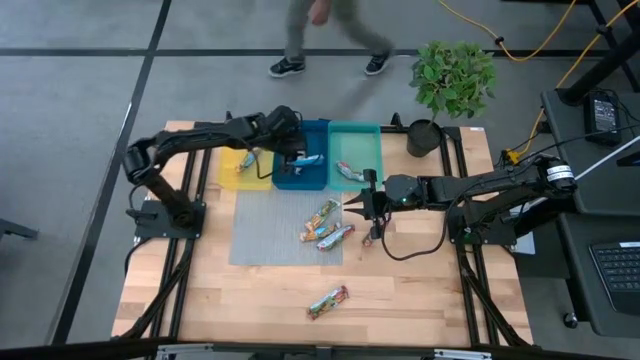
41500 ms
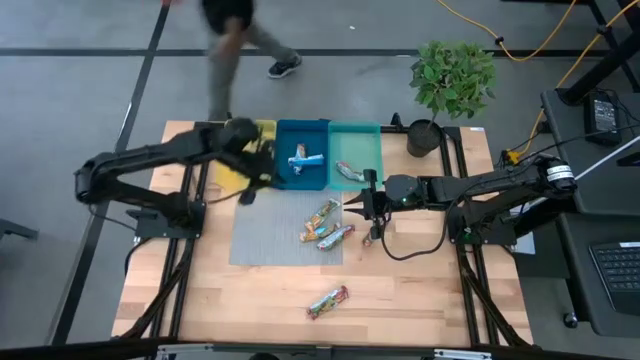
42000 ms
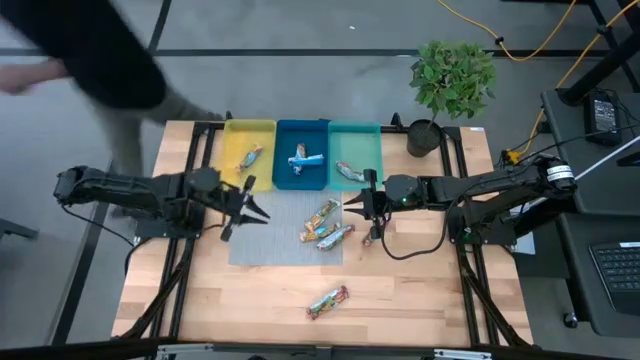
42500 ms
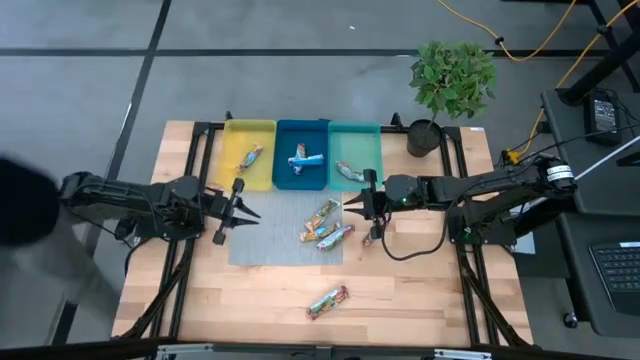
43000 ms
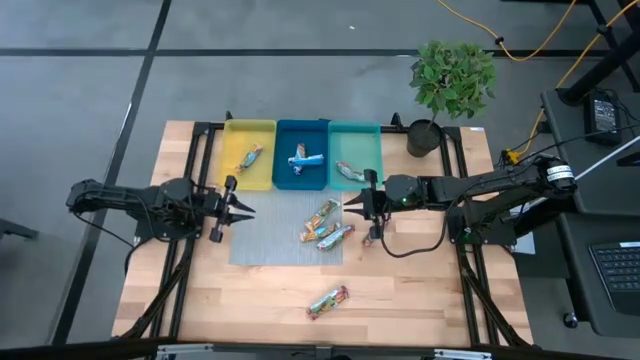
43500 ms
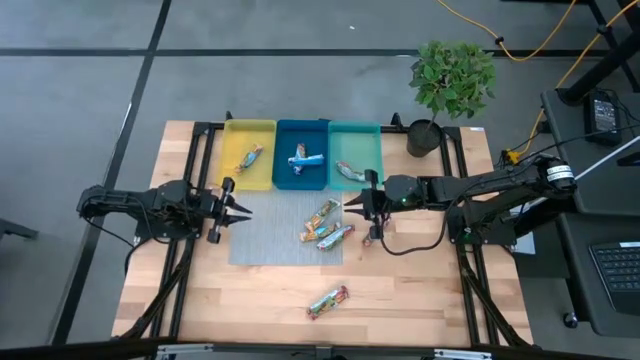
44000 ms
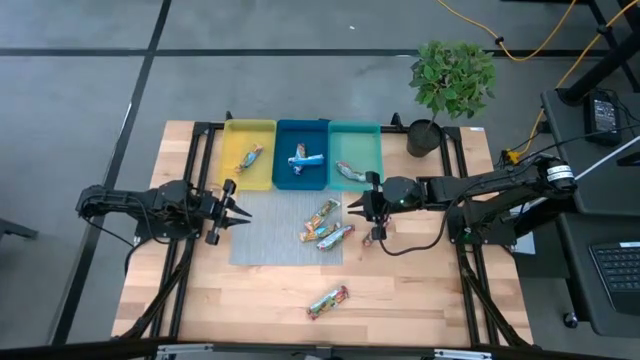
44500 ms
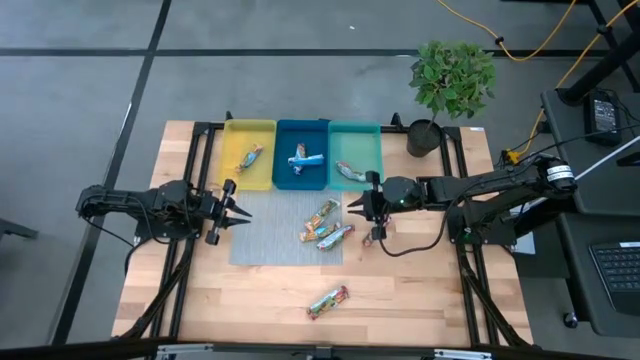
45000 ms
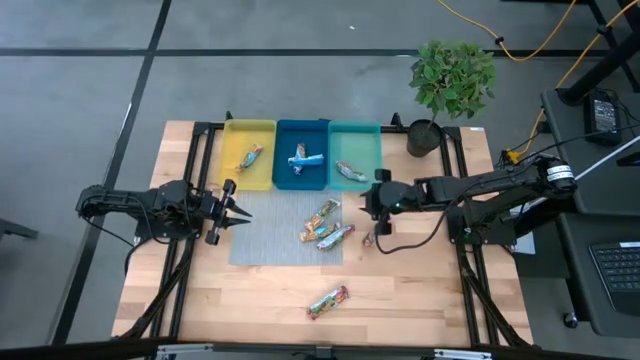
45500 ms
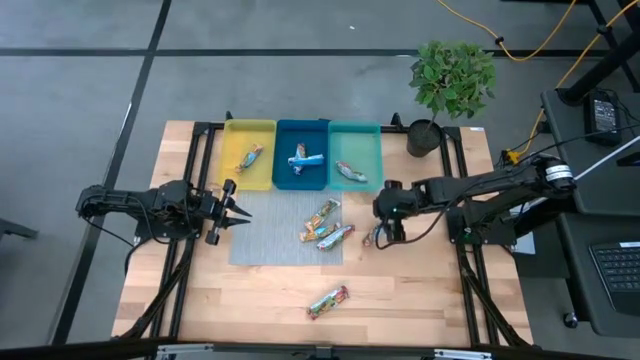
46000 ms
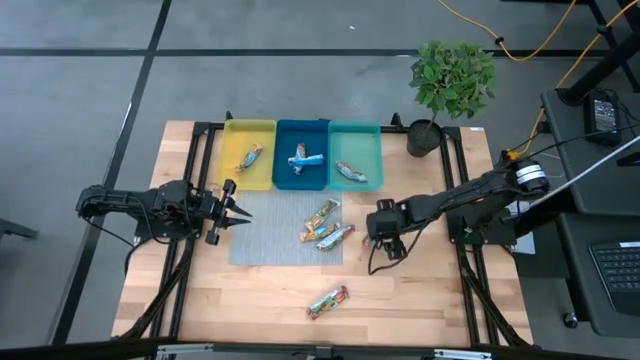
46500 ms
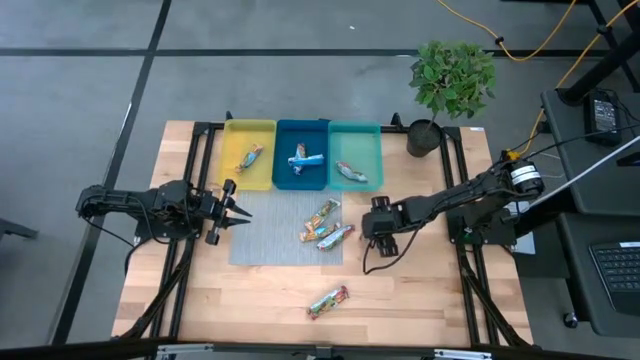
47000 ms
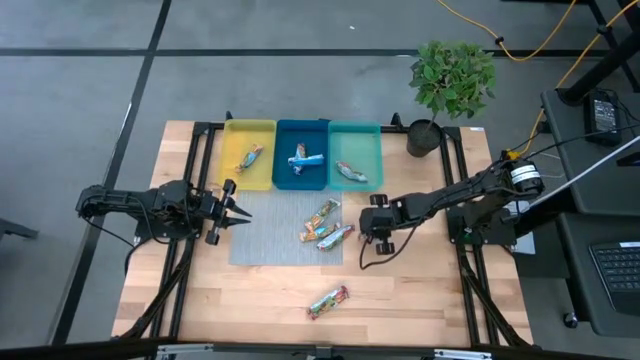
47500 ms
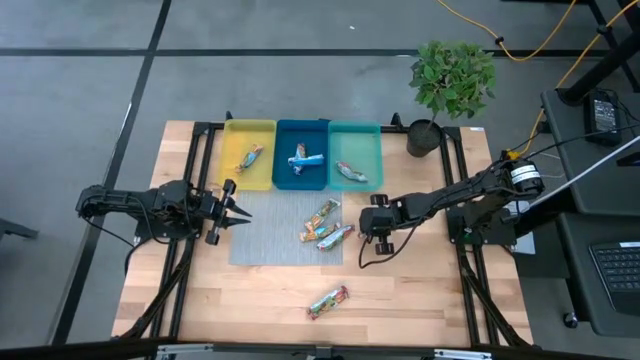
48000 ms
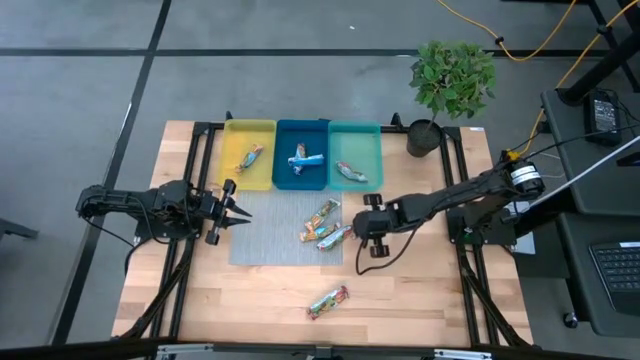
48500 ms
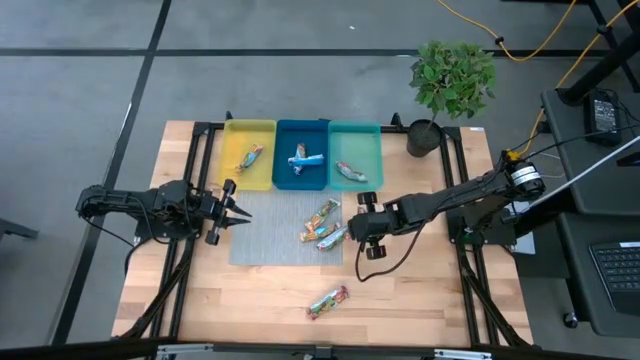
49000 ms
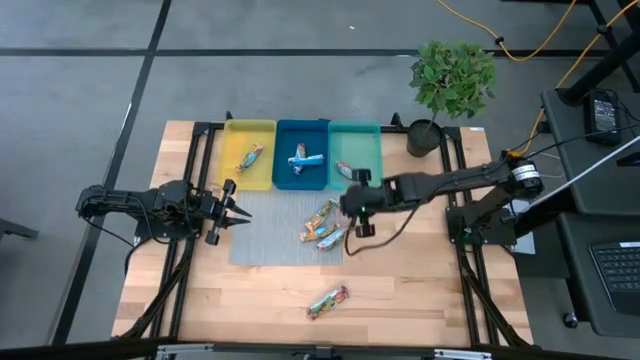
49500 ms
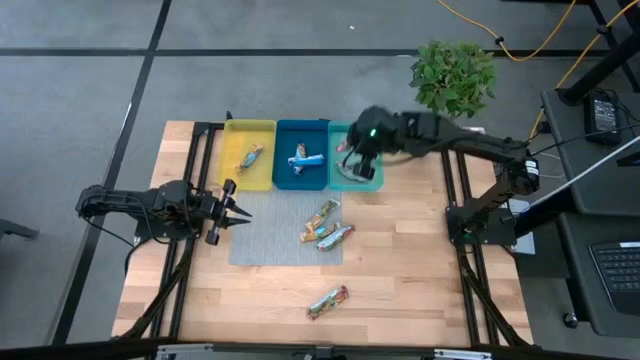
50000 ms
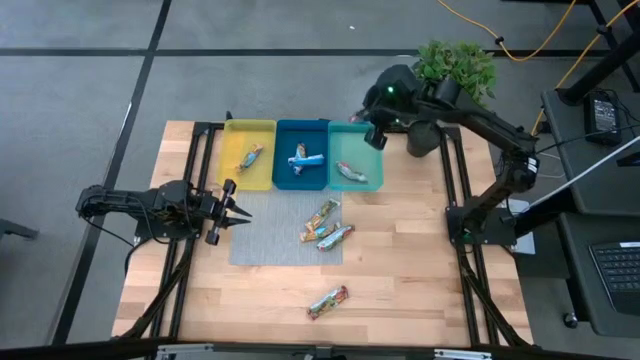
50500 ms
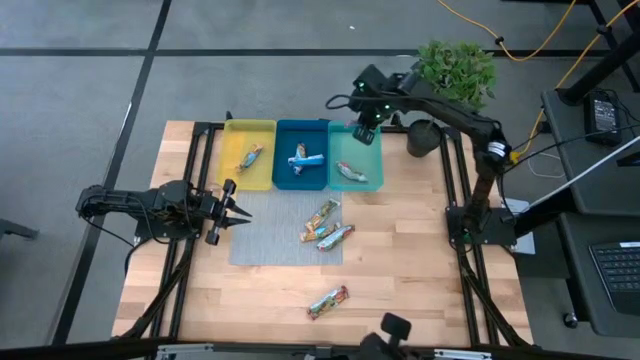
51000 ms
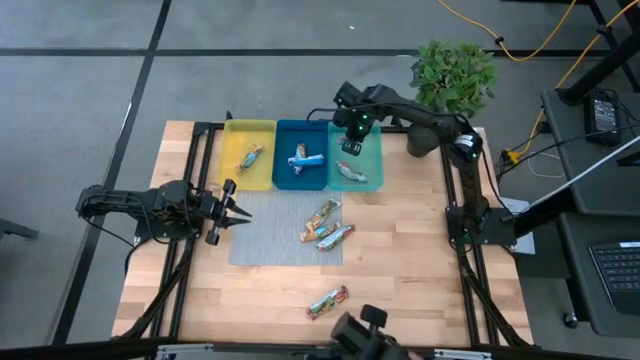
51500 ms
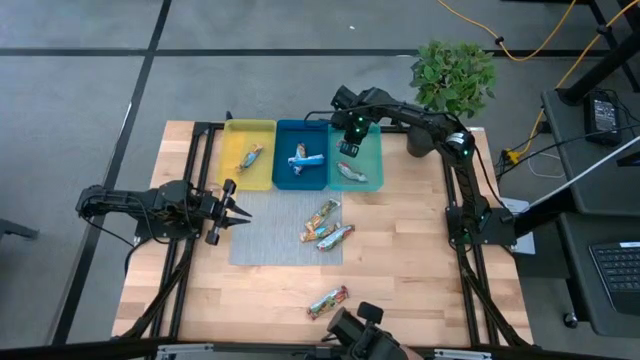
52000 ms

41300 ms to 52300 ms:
Task: Pick and place Granola Bars by type
Put the red granola bar into the light blue bin

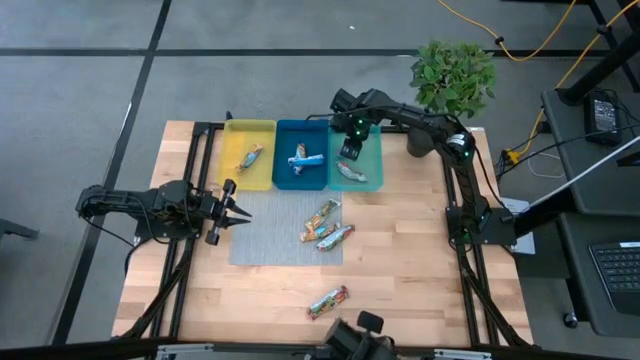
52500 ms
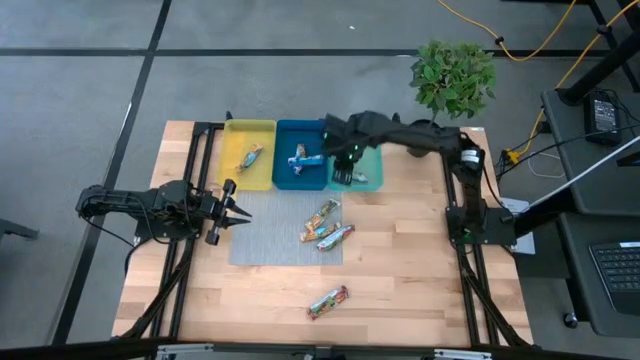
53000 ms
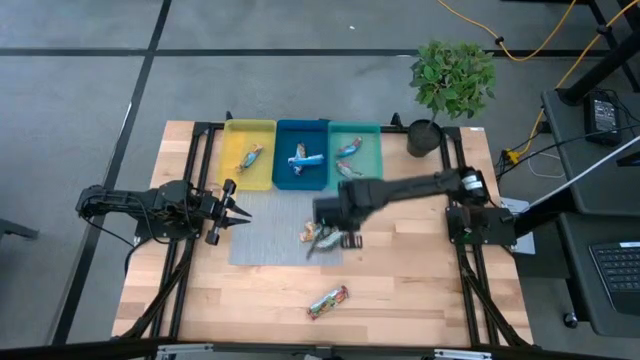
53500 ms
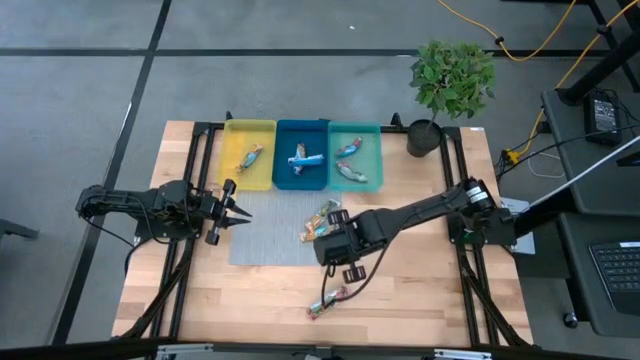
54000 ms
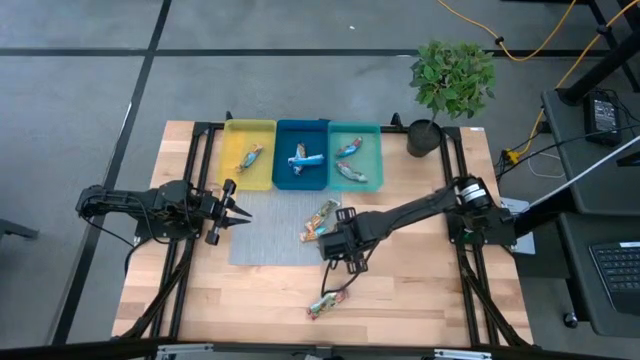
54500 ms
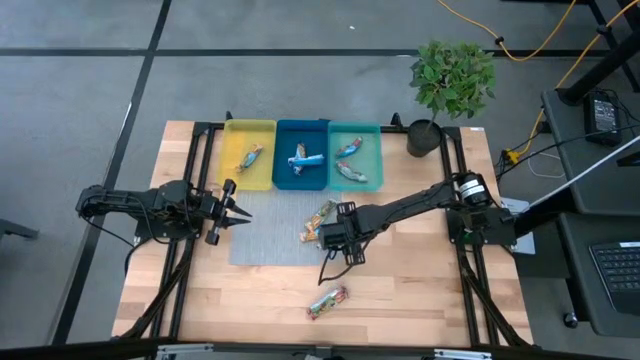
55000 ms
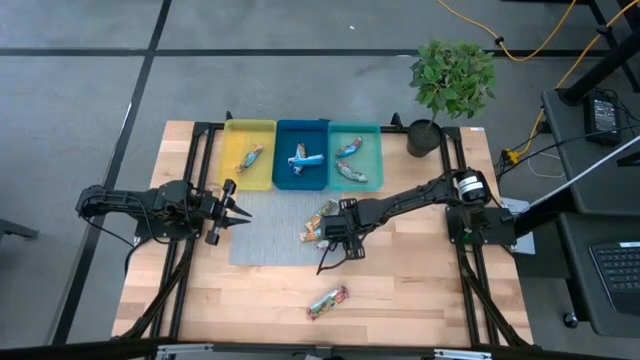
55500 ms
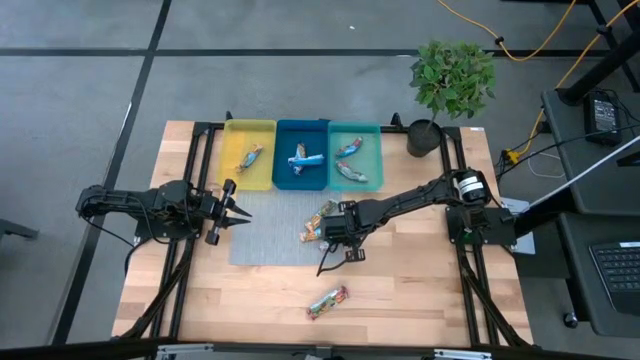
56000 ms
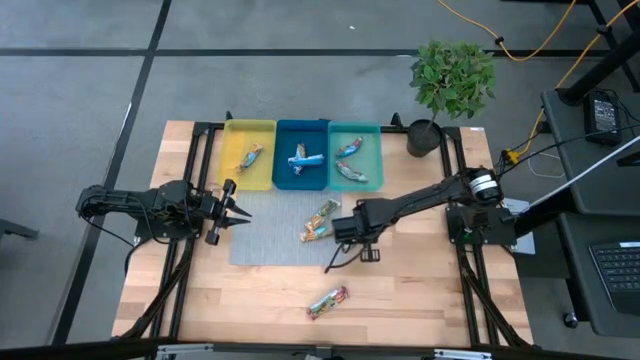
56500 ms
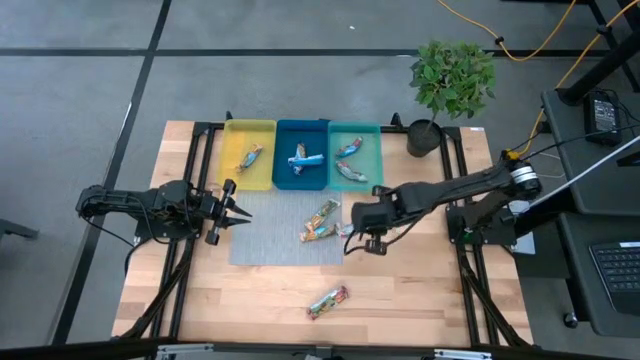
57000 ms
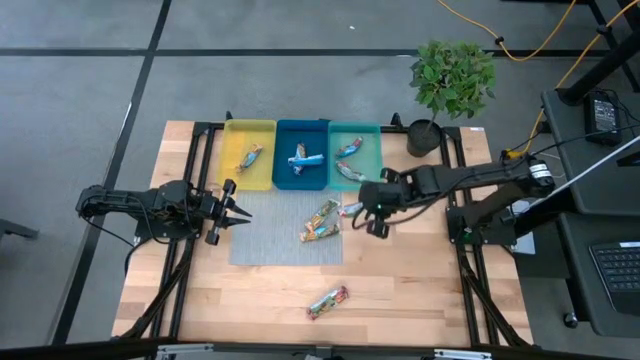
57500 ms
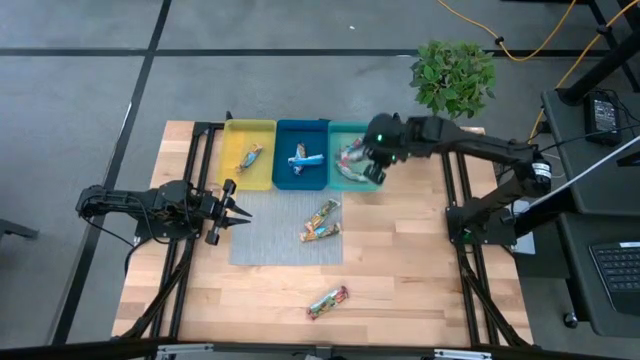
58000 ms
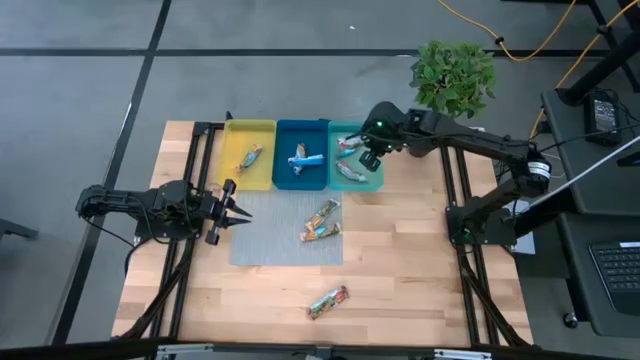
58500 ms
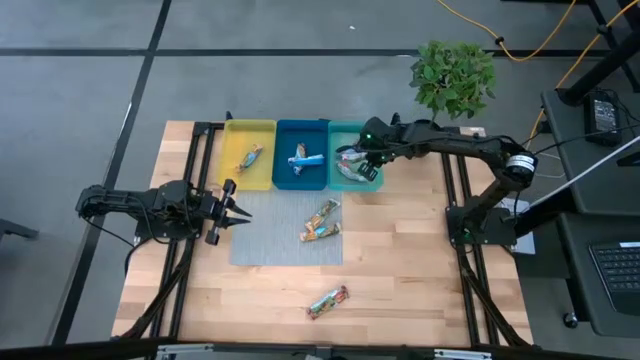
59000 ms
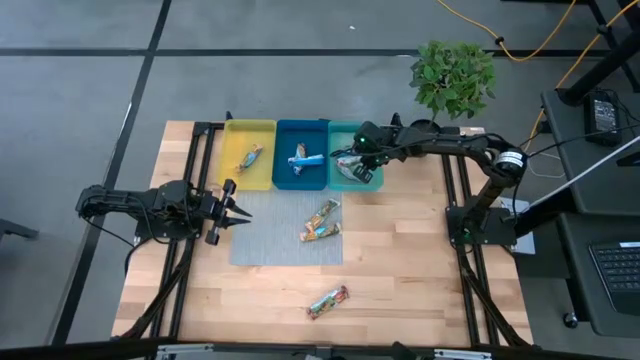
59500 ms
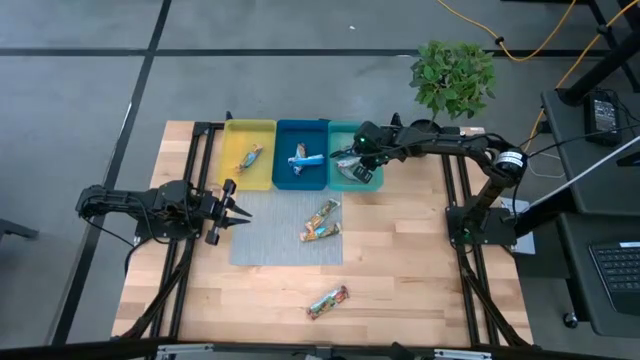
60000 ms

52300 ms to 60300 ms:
Put the red granola bar into the light blue bin
